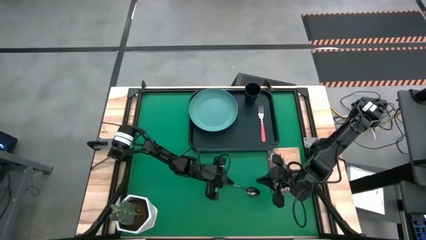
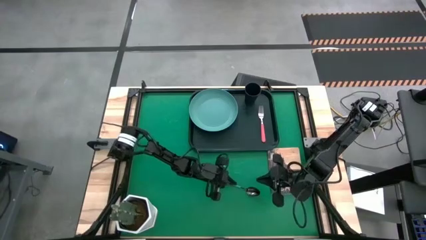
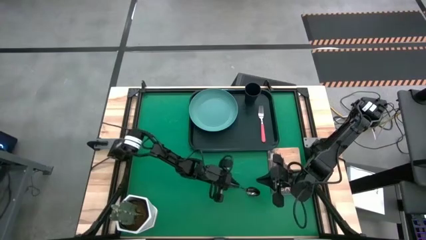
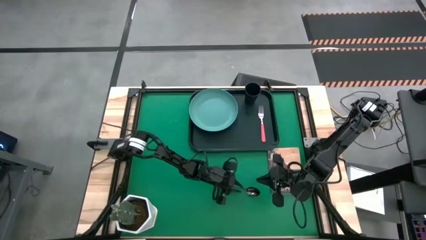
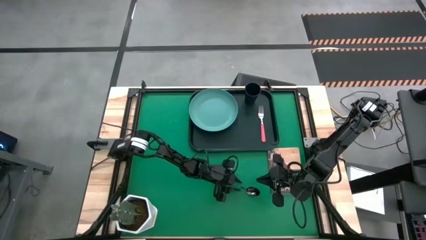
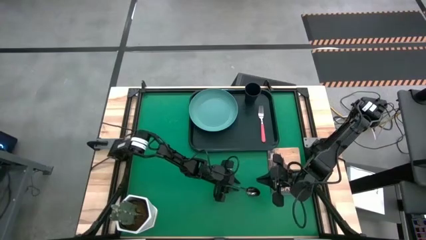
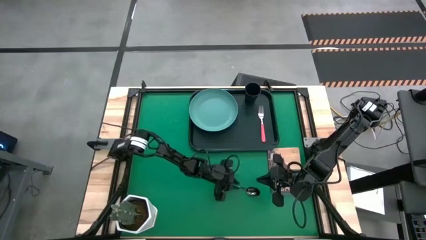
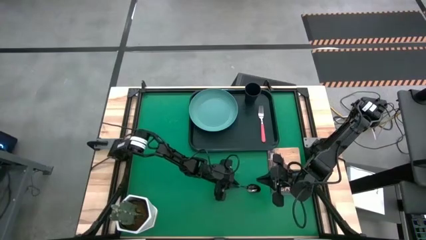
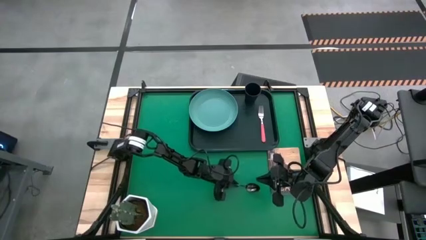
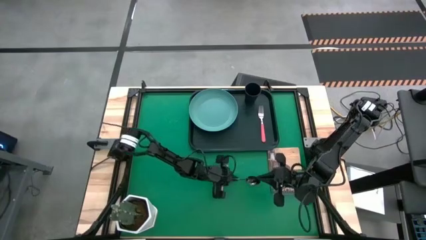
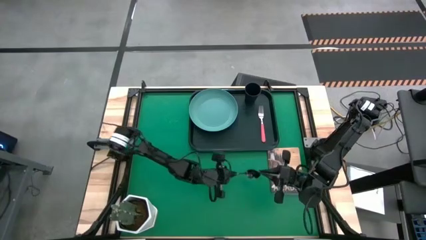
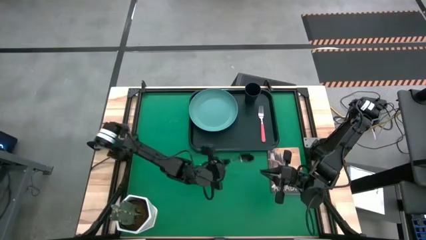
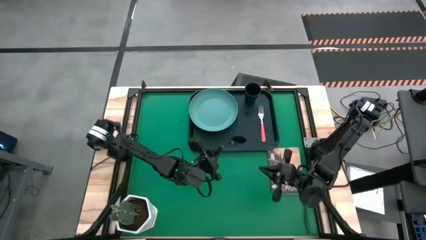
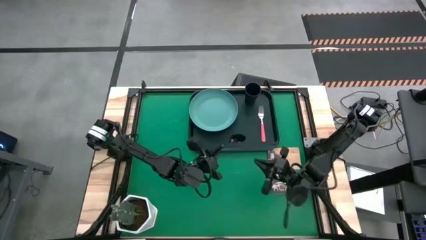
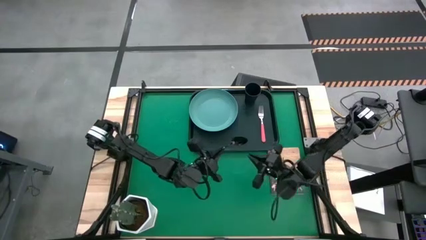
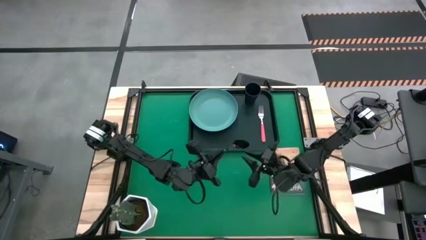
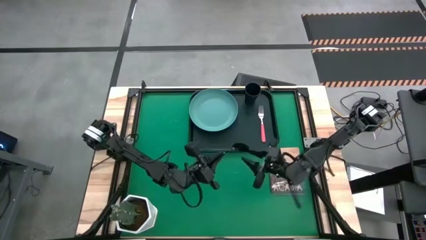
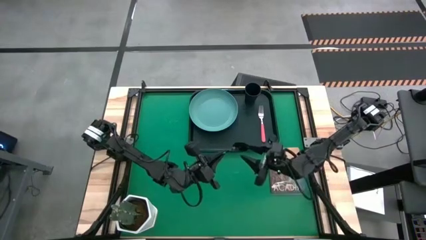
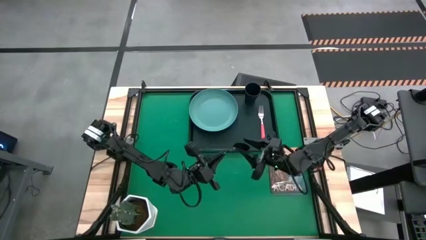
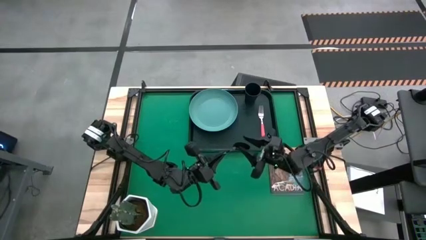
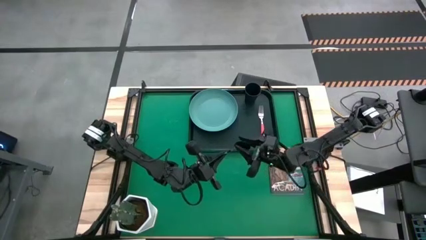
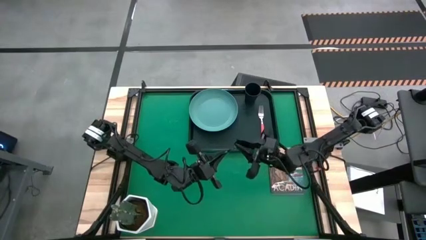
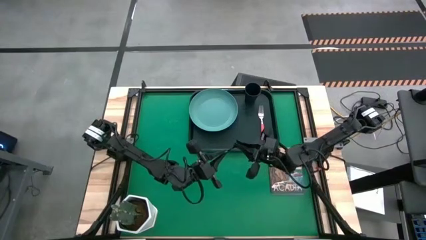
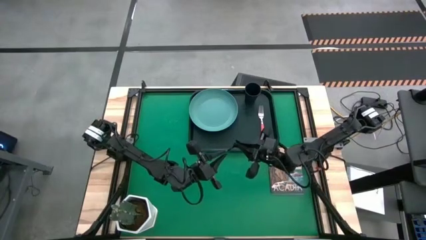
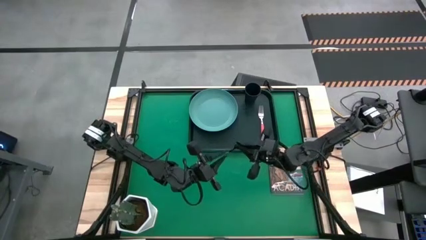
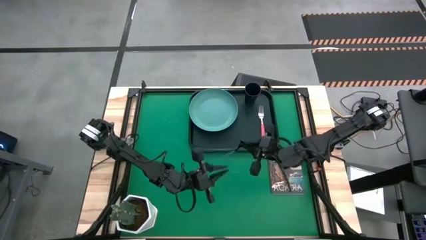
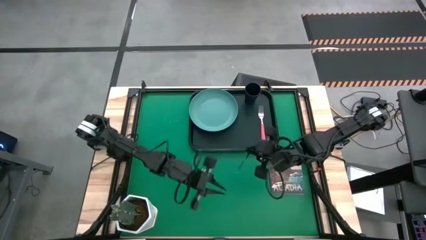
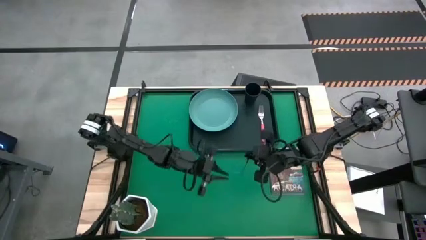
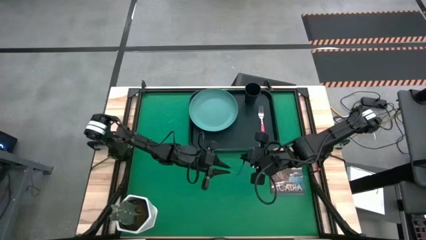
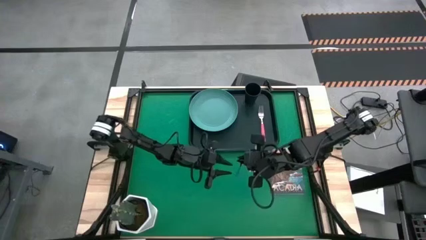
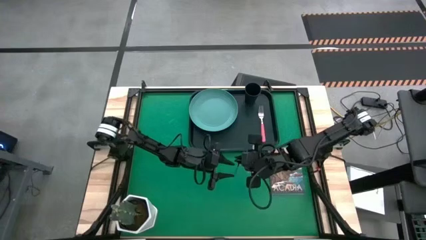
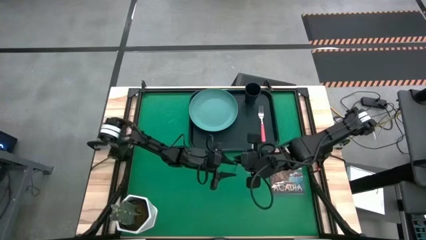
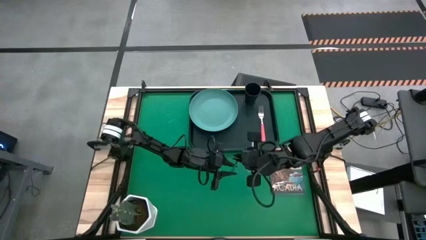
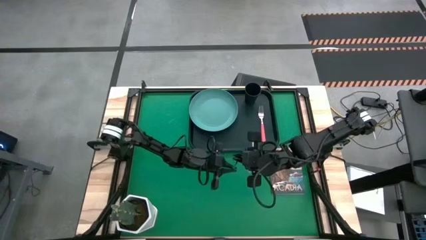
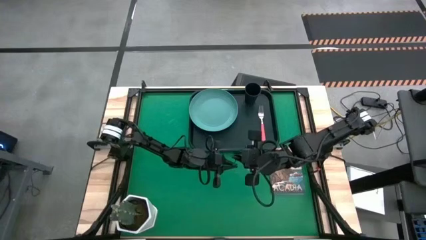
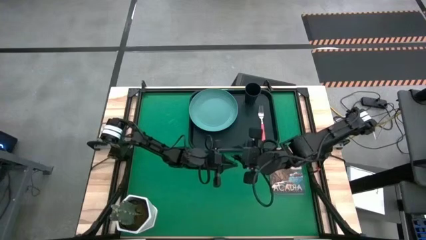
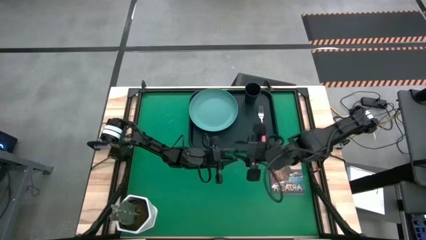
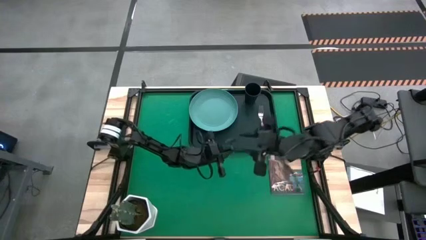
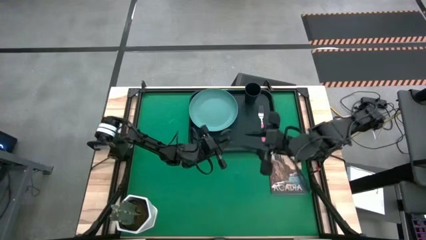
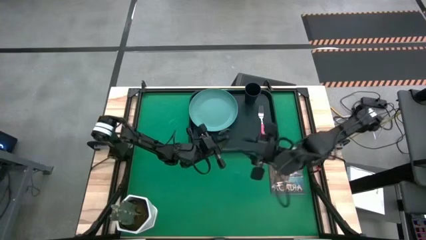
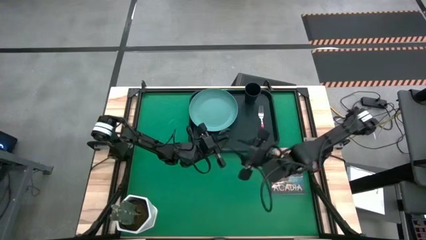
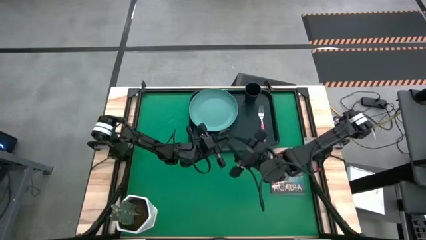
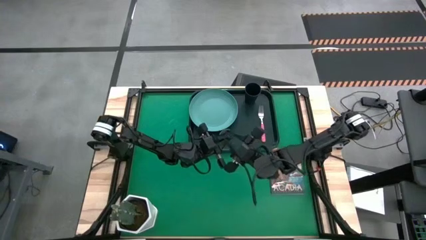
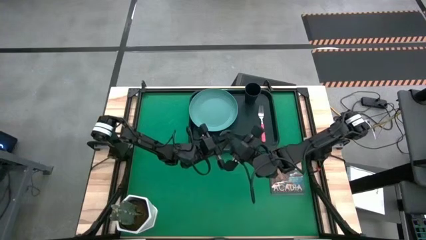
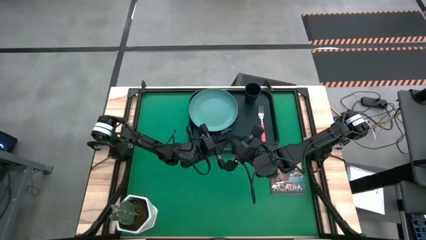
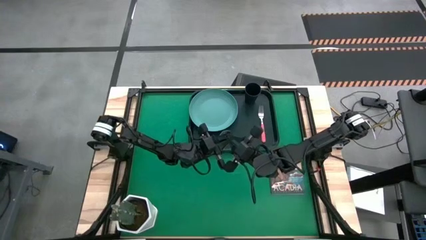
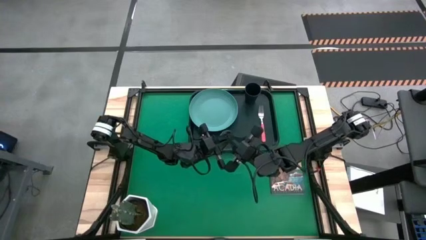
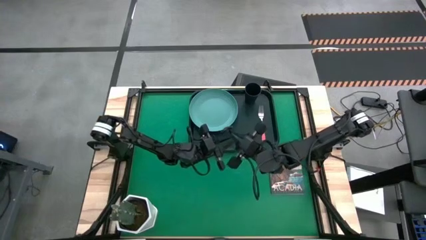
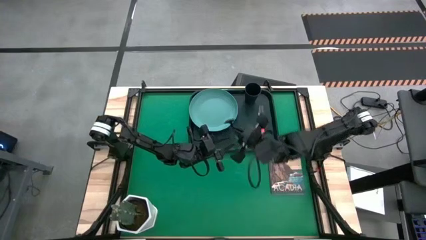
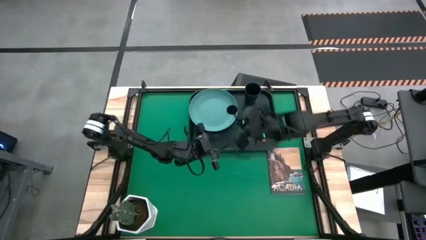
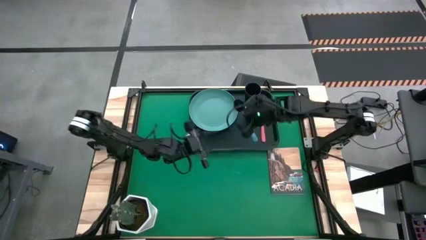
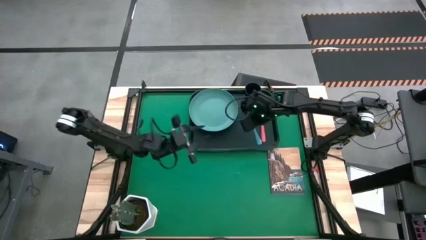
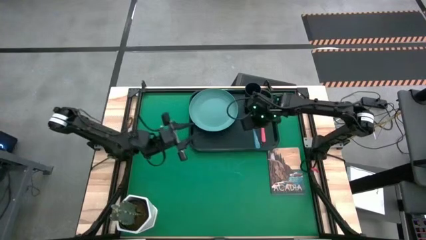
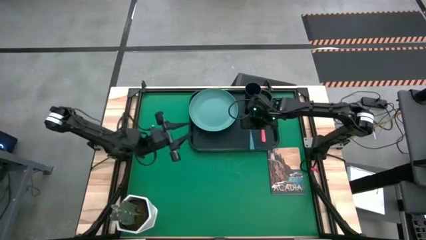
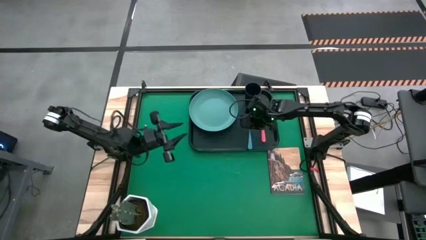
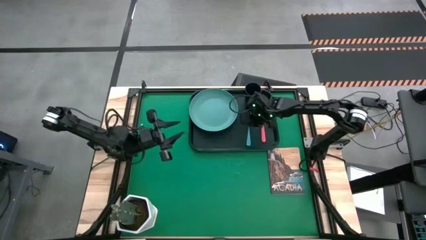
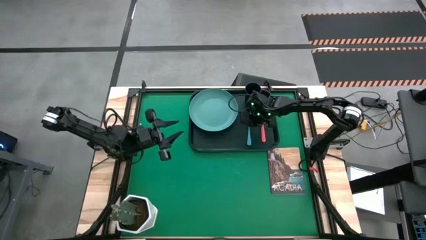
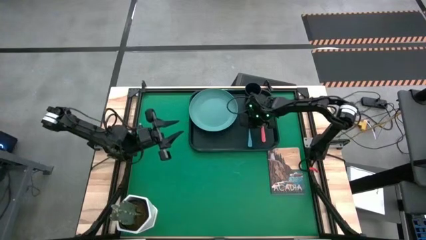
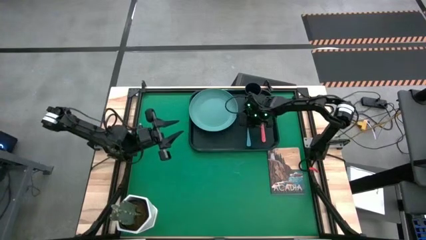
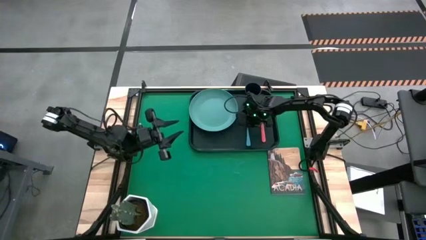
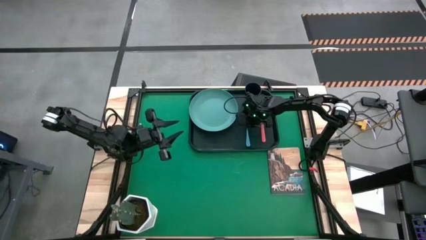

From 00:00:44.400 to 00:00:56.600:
Task: Pick and place plate/cup/fork/spoon on tray
Put the blue spoon on the black serving tray to the right of the green plate
